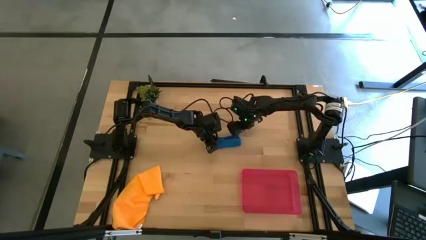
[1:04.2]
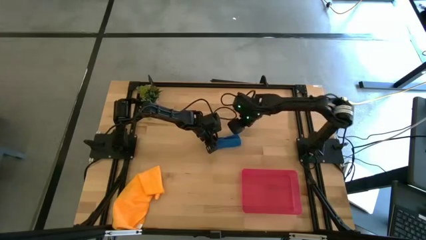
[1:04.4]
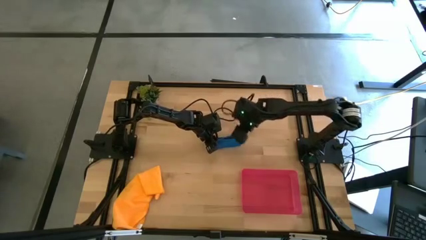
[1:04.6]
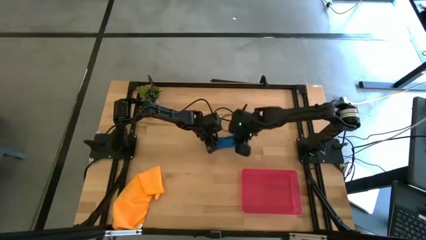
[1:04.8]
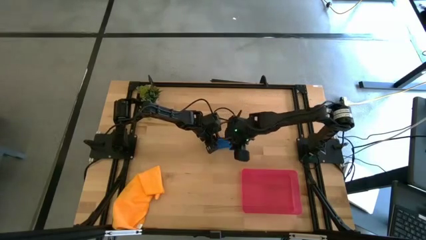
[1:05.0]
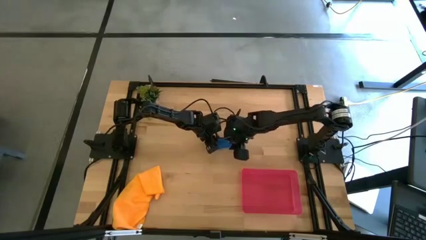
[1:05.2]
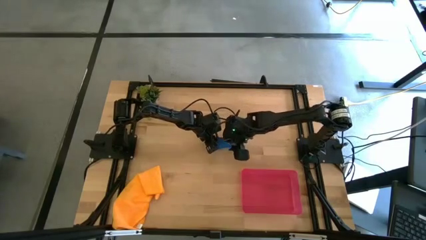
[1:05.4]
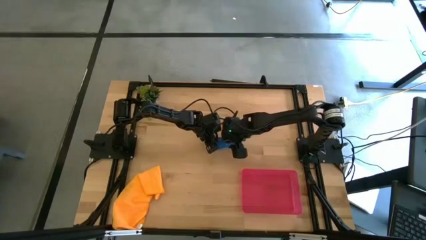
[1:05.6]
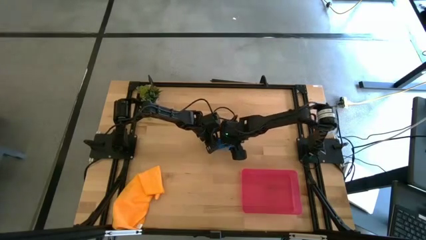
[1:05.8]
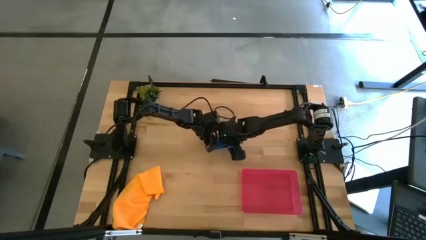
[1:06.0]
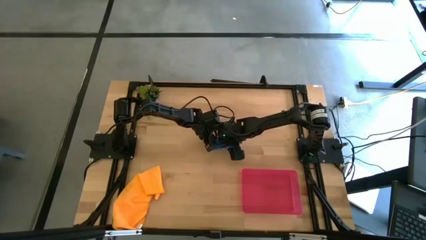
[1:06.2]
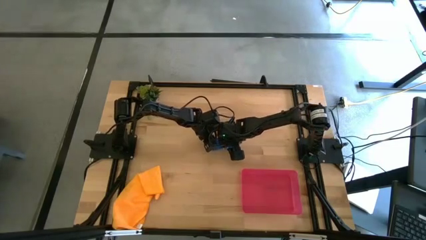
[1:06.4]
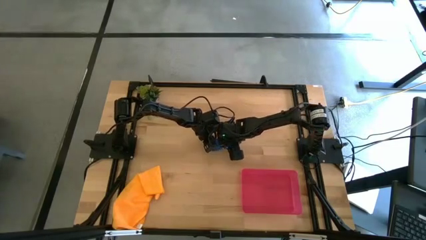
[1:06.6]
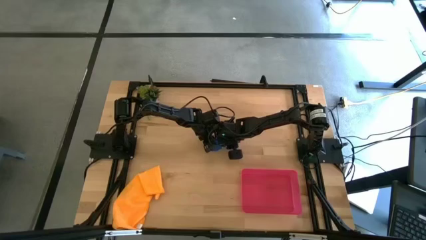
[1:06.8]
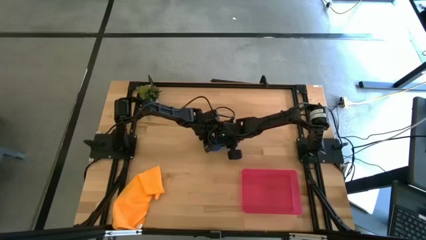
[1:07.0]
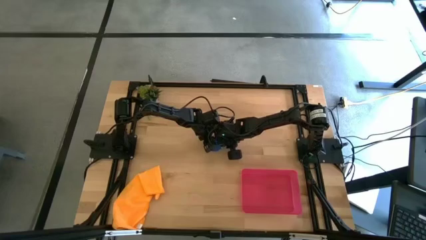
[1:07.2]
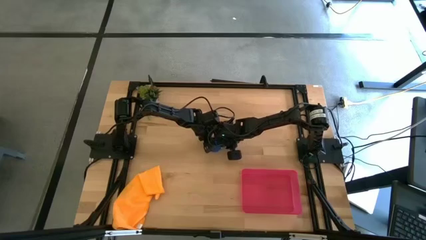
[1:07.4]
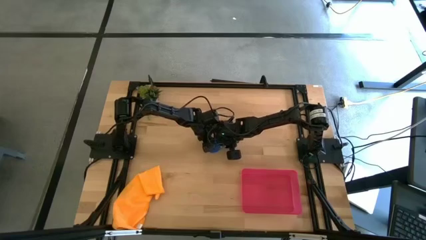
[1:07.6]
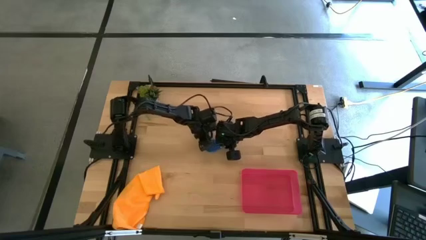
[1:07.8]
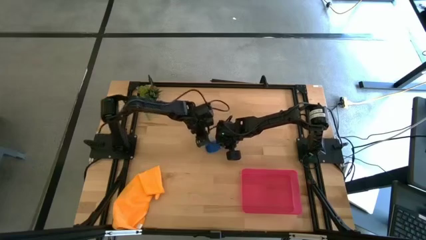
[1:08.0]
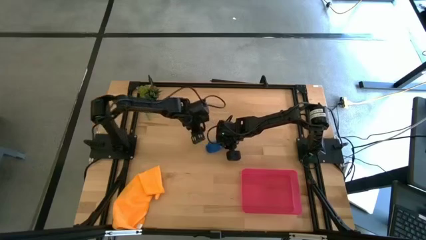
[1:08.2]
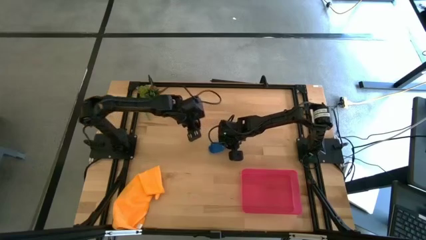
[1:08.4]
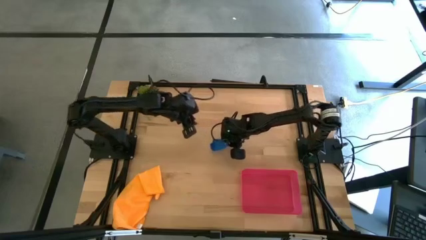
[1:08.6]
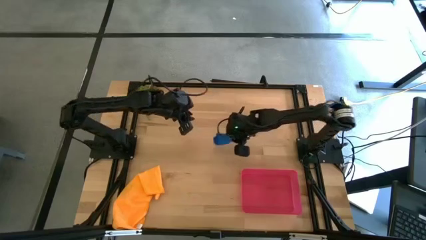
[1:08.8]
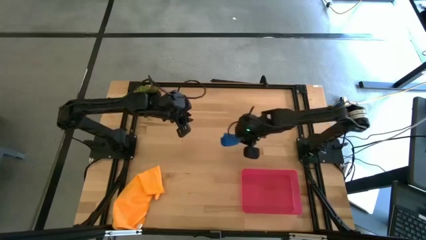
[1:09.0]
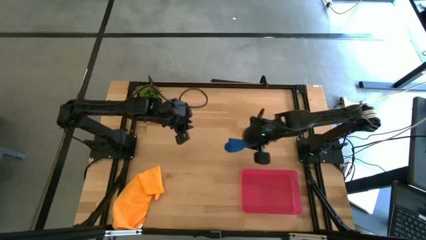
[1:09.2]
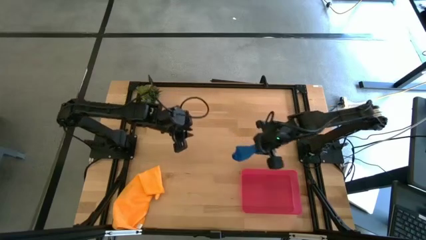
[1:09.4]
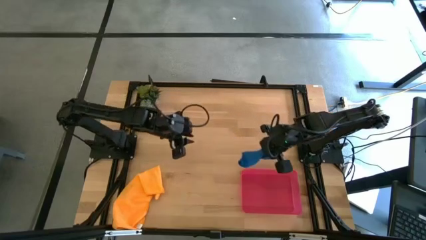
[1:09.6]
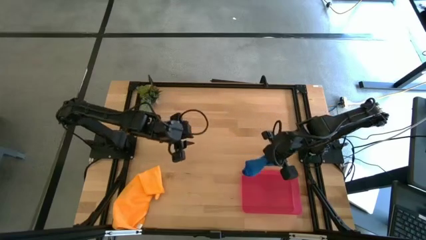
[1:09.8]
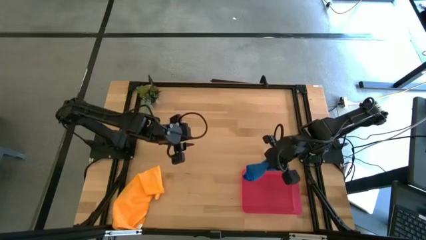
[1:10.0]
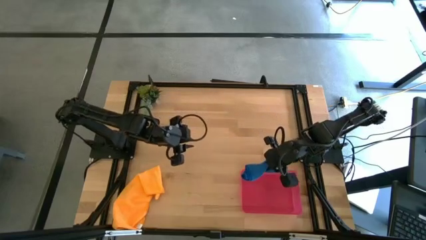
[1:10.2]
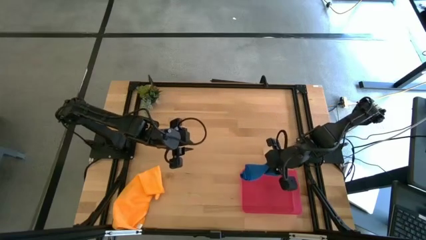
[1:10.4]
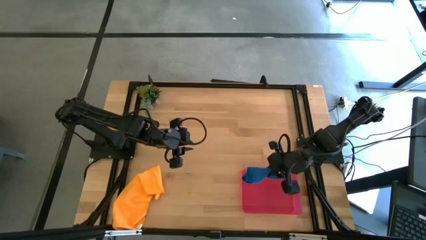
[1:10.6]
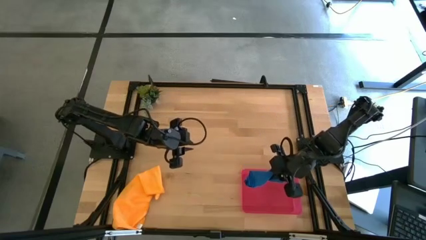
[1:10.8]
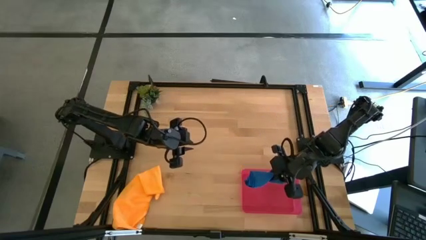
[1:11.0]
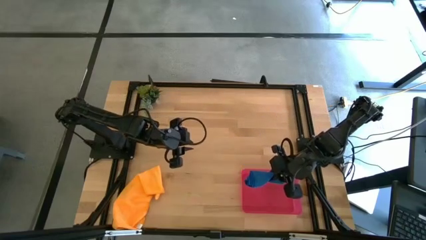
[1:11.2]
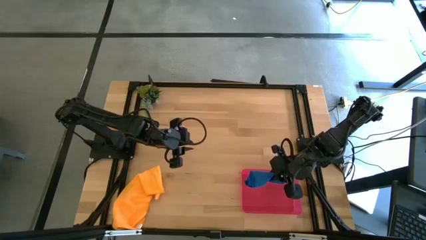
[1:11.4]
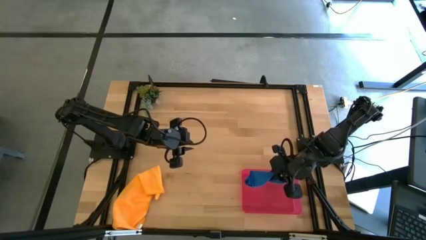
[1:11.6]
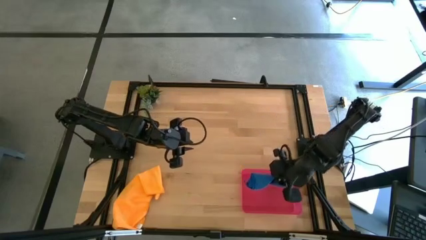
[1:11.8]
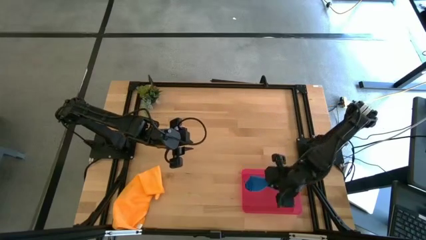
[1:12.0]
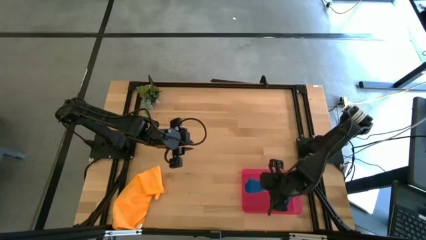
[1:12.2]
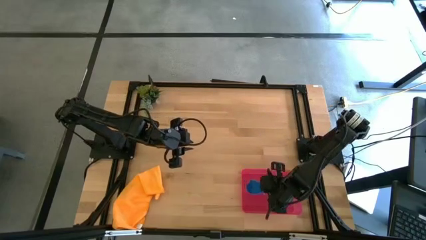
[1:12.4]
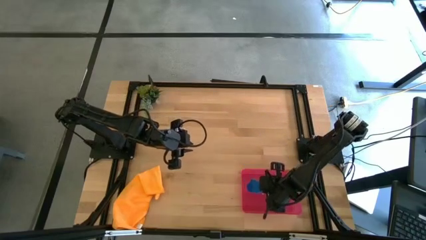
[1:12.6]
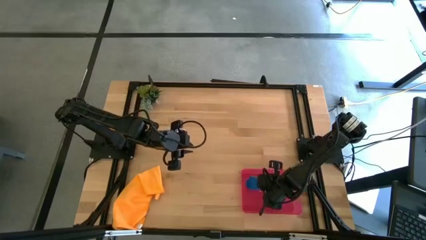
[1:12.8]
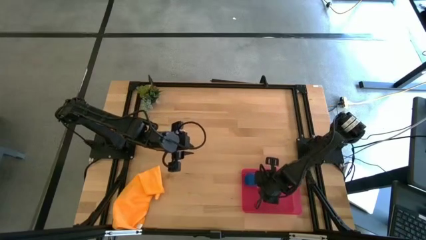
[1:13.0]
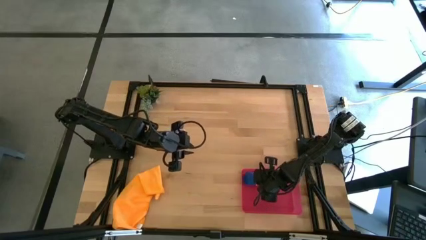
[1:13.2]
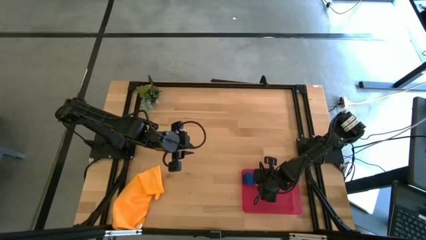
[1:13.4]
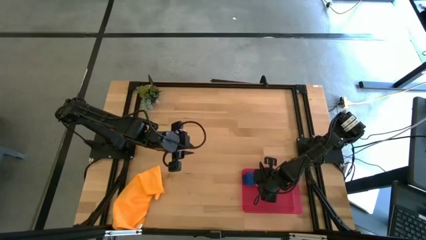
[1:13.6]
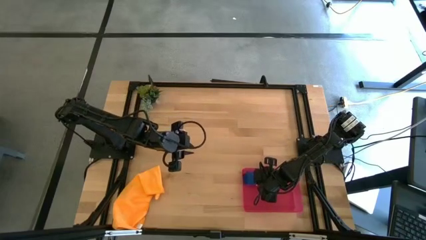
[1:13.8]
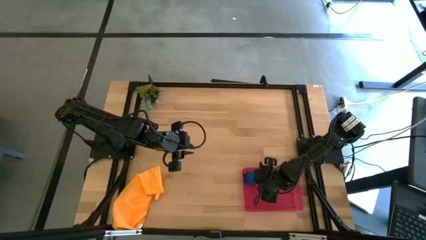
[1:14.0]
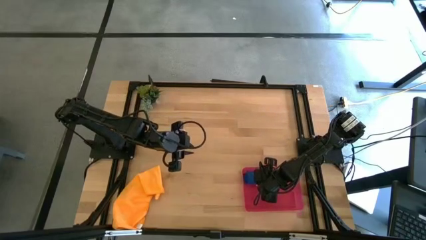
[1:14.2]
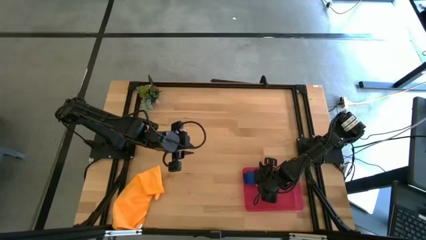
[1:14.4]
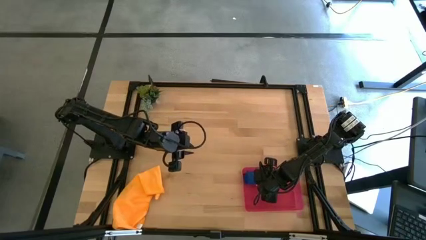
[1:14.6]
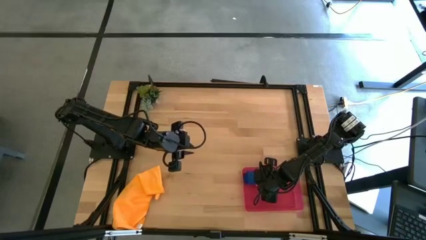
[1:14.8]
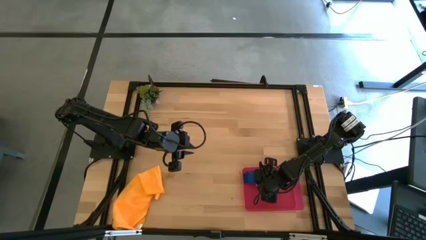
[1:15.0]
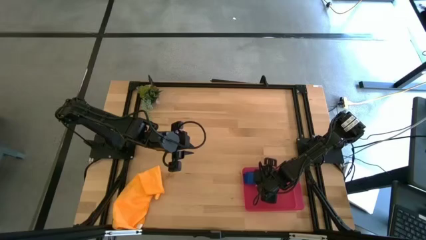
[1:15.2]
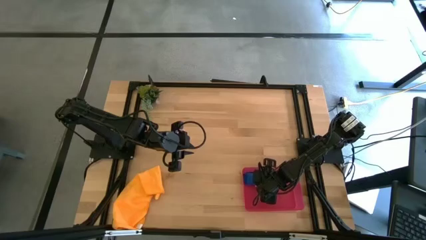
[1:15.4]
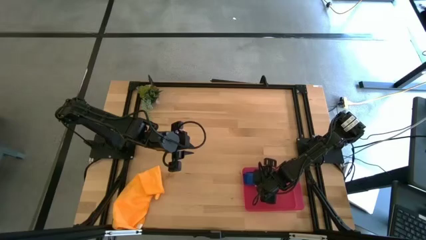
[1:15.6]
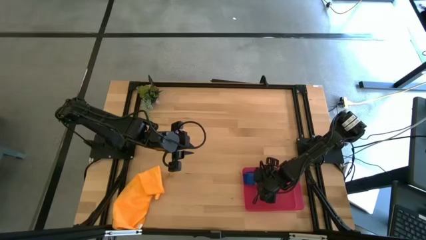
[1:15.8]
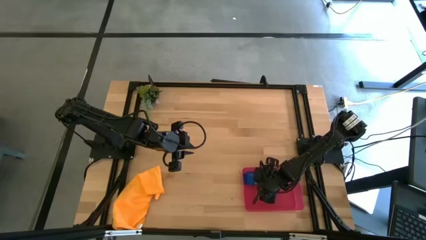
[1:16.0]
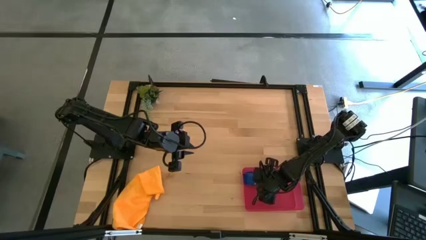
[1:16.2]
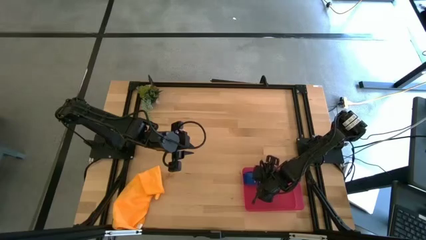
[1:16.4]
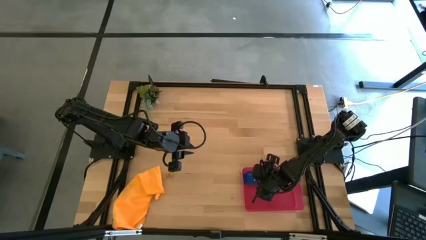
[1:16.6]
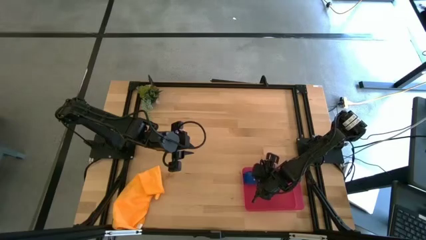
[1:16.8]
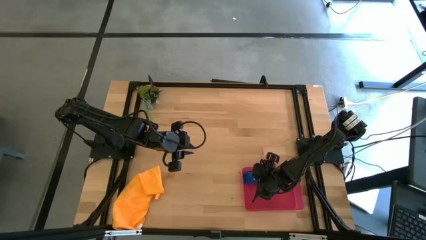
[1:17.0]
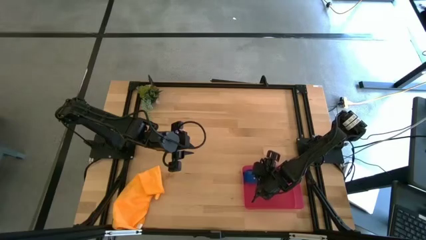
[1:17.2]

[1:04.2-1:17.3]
Task: Roll microfiber towels into tight, uniform cylinder then place into a basket
Put the blue microfiber towel into the red bin

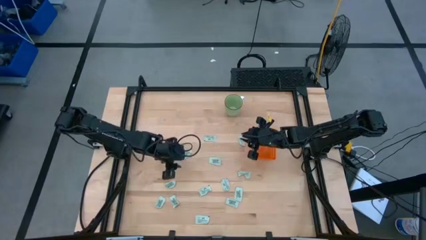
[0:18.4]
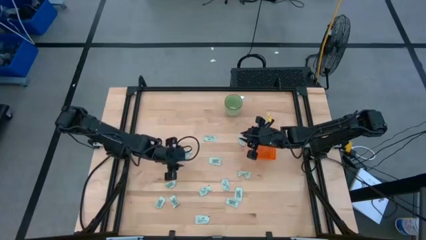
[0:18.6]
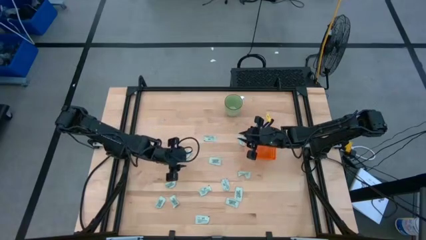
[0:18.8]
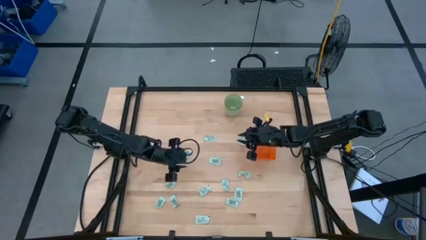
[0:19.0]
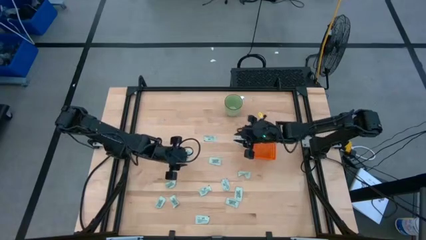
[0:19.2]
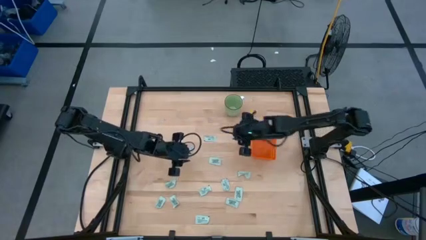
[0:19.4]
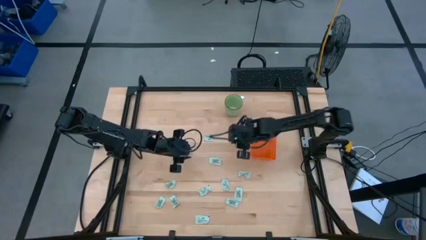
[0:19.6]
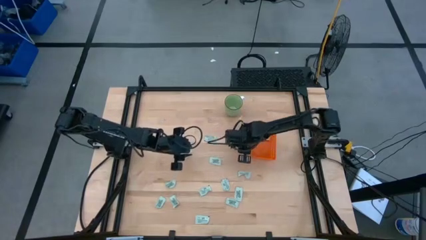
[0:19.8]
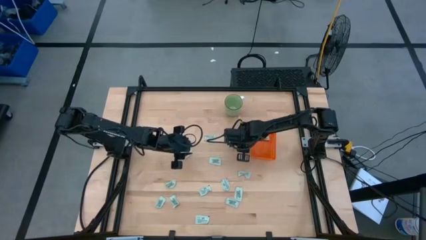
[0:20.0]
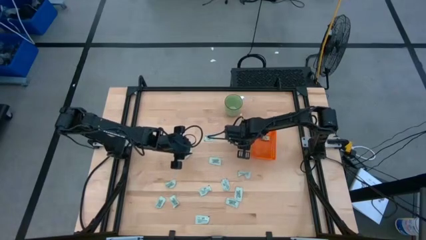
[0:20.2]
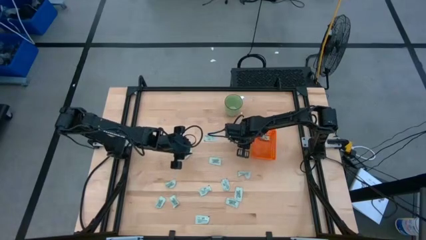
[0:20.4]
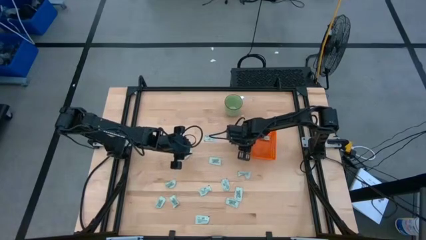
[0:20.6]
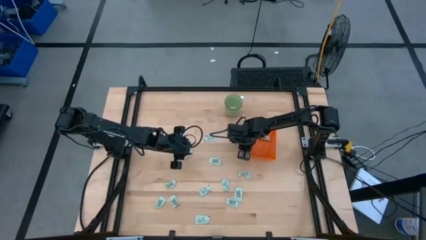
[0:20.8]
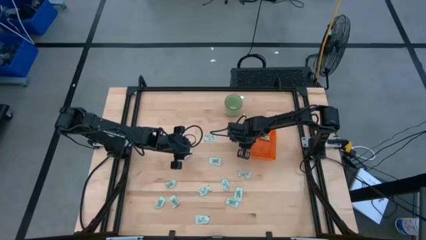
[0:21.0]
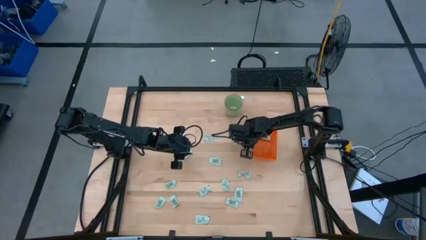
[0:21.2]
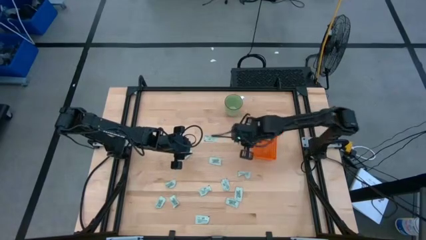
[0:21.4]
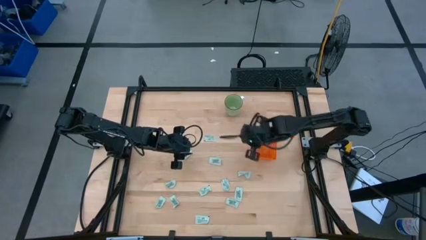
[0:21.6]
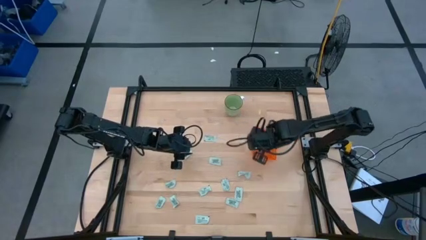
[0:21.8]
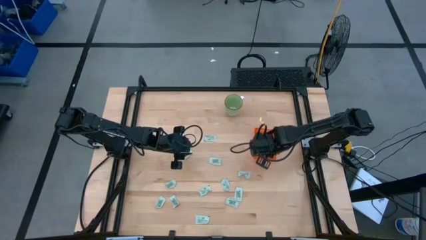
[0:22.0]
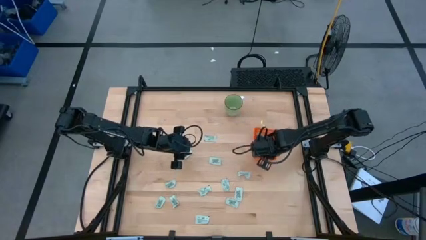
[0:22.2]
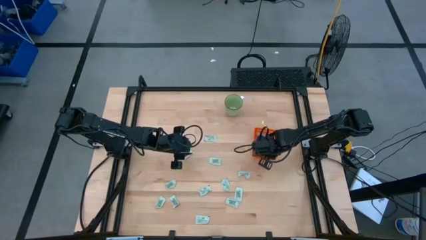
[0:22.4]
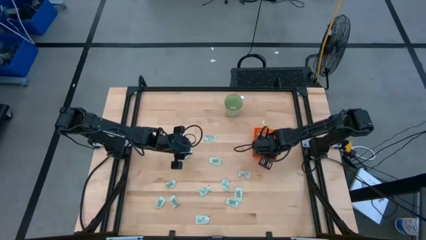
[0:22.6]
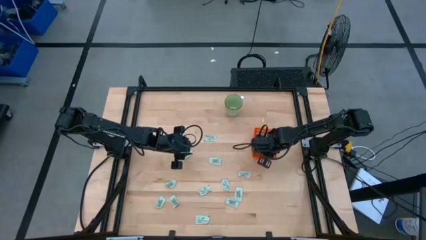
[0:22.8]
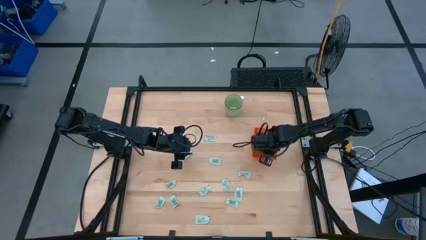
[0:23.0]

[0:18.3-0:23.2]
Task: Pick and place Stevia / Truvia into bins
Put the light green packet into the orange basket
